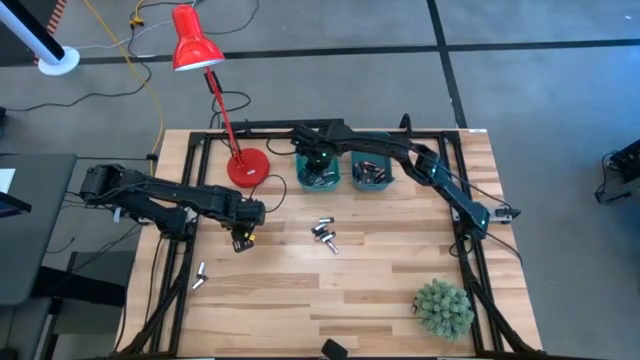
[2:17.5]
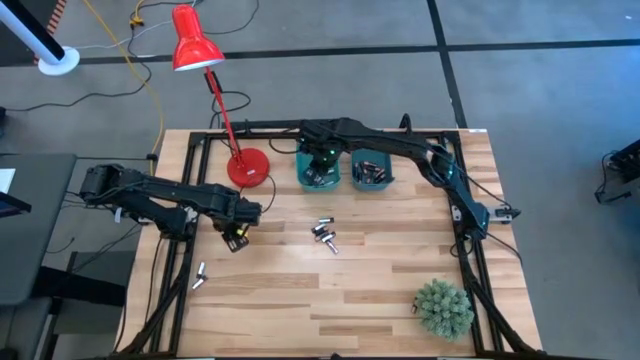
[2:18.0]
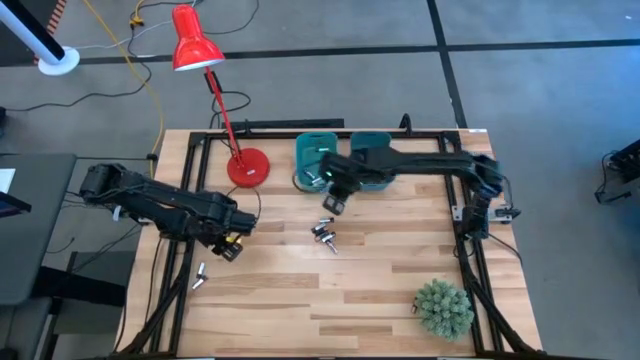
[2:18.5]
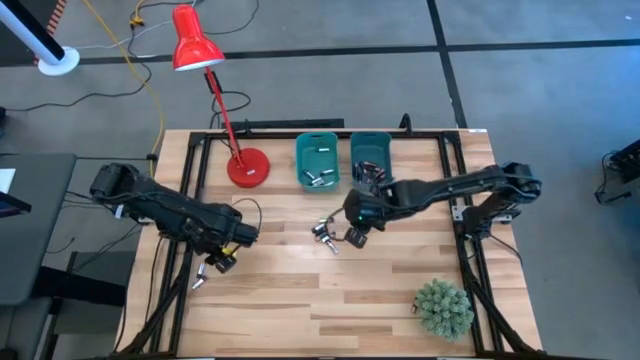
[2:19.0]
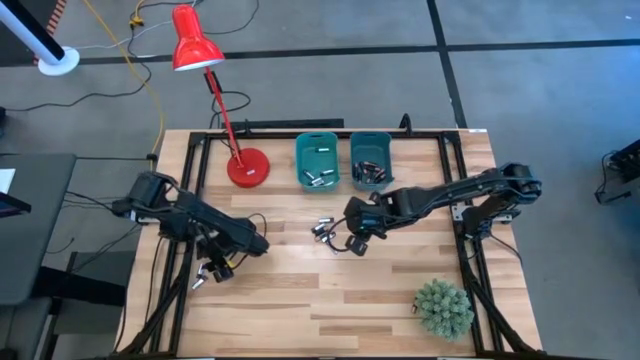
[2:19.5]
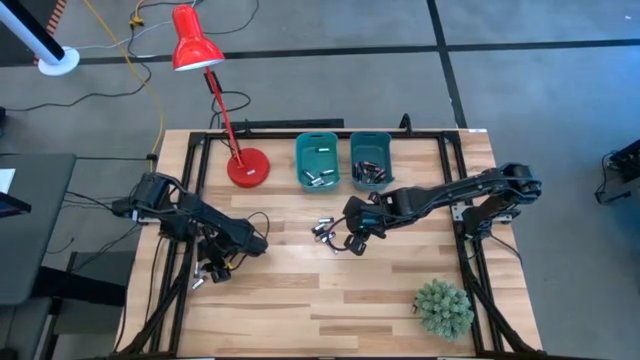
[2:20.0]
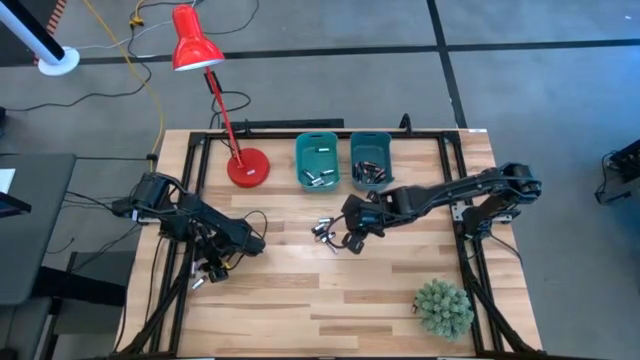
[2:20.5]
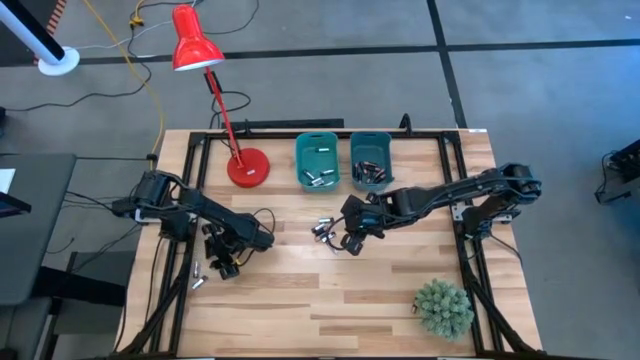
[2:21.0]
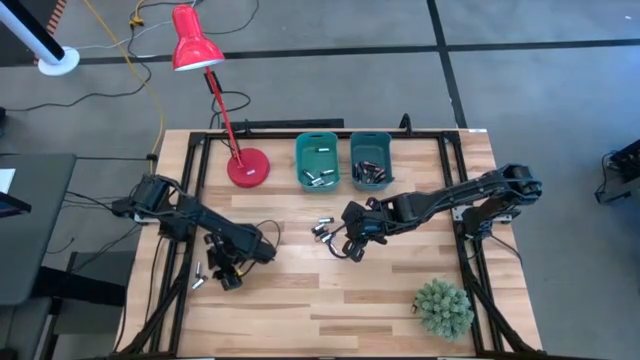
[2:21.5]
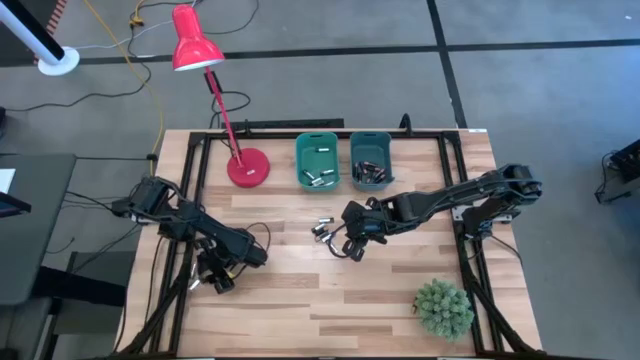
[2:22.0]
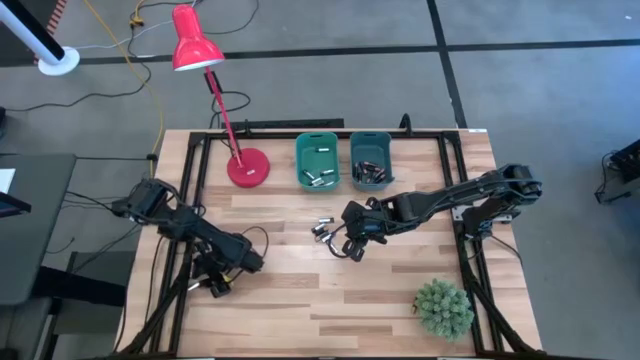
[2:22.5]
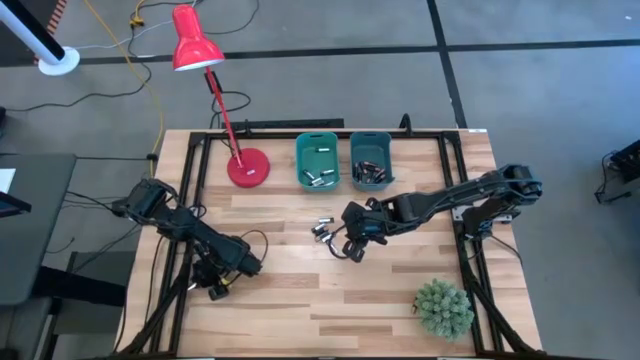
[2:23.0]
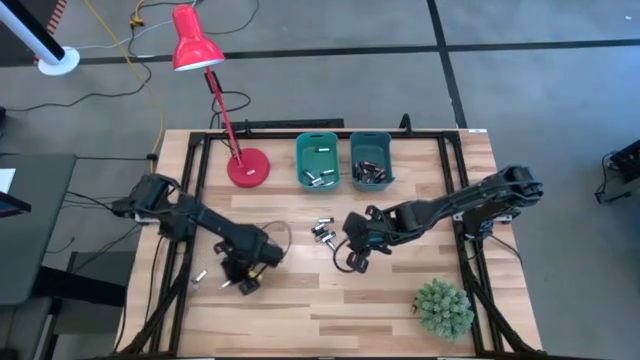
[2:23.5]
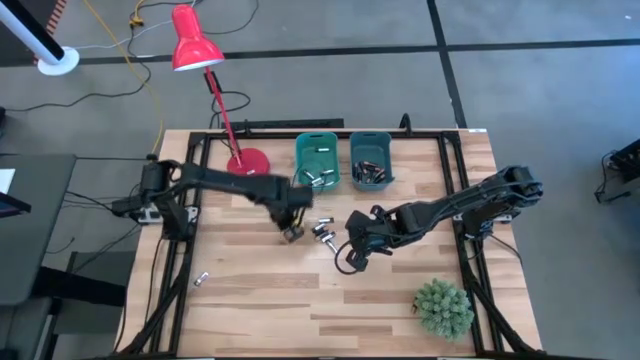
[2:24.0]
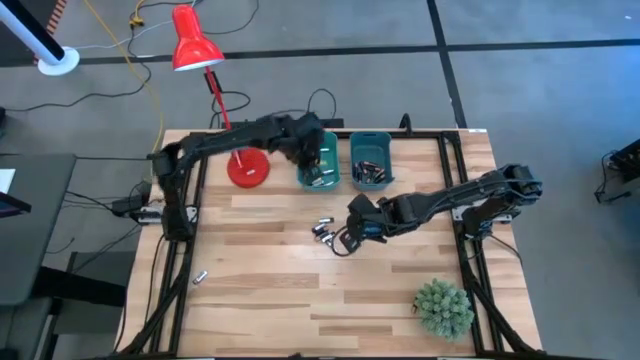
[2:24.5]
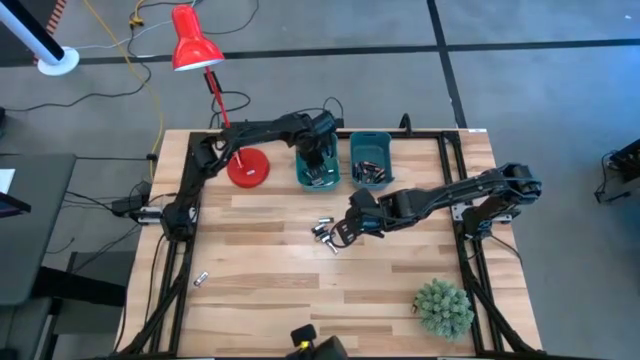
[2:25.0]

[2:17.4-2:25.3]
Task: Sort batteries
Put the silver battery into the green bin

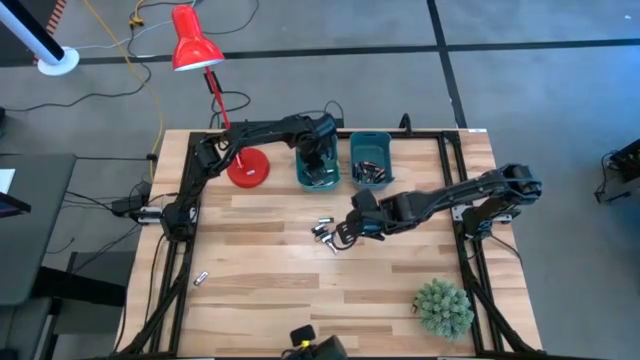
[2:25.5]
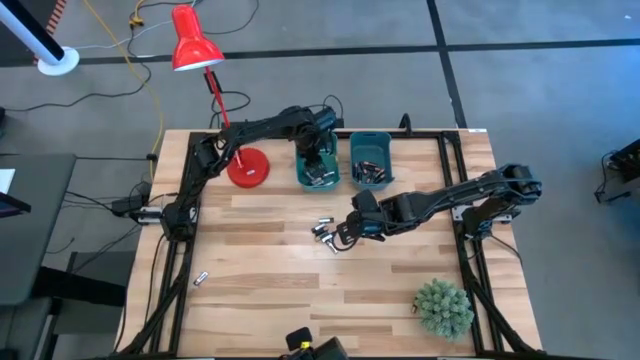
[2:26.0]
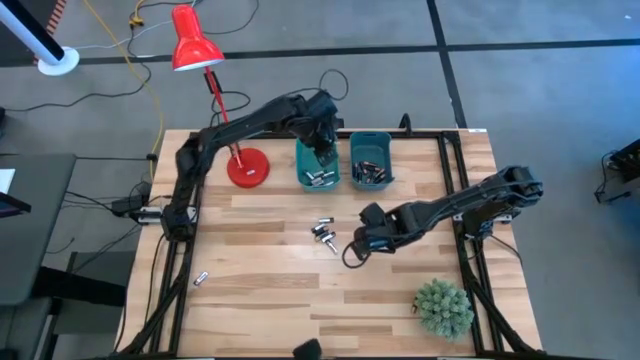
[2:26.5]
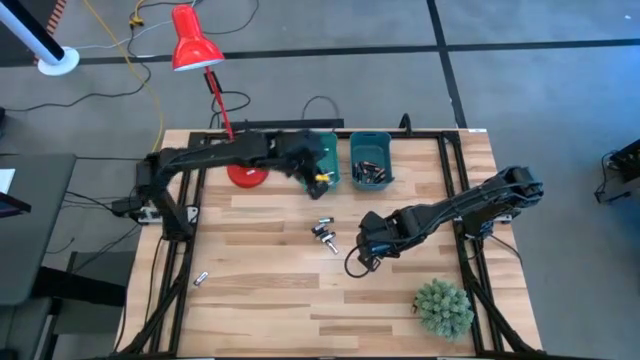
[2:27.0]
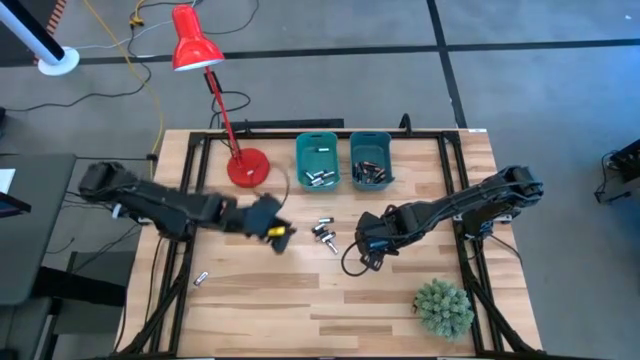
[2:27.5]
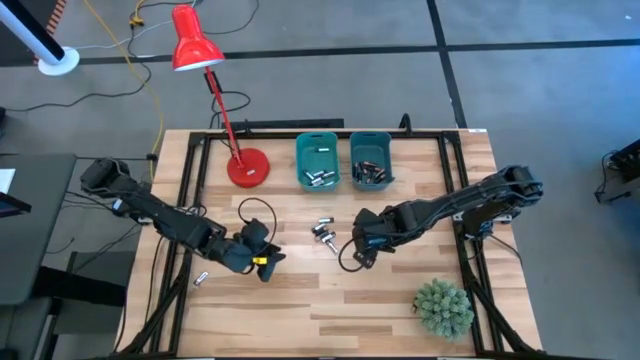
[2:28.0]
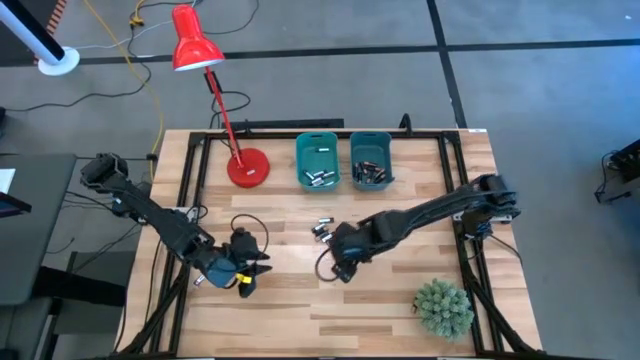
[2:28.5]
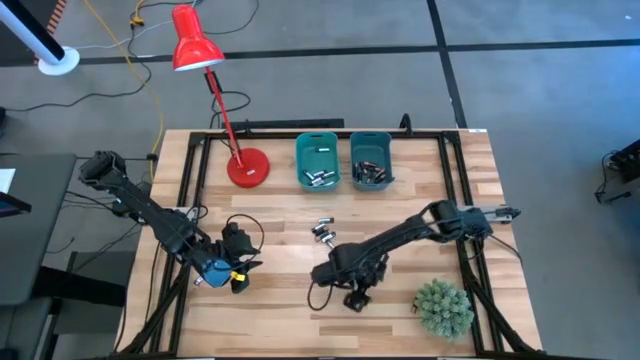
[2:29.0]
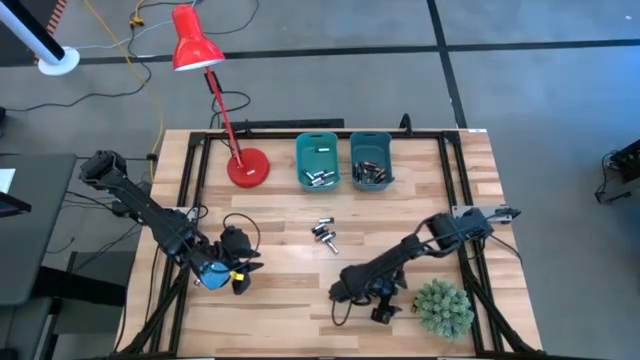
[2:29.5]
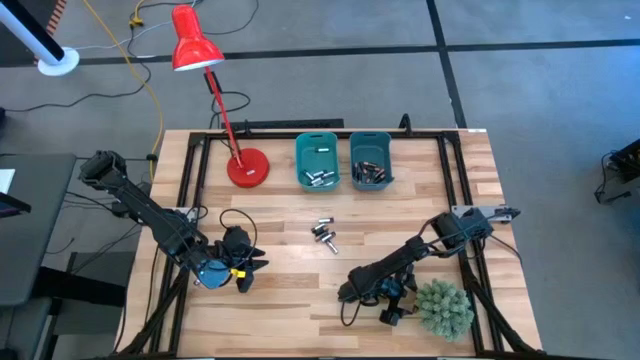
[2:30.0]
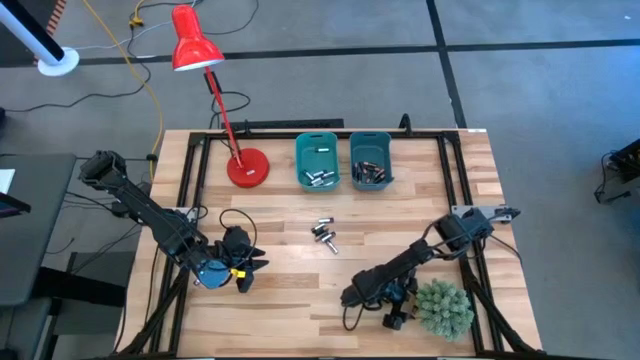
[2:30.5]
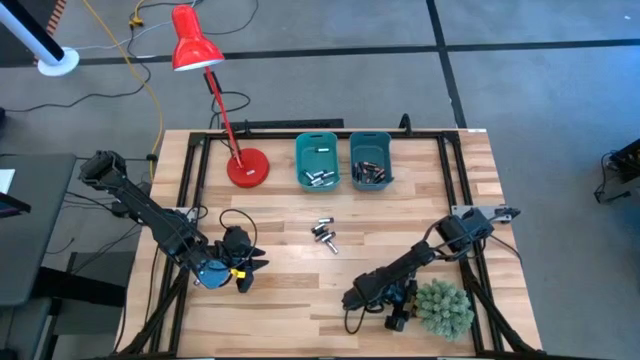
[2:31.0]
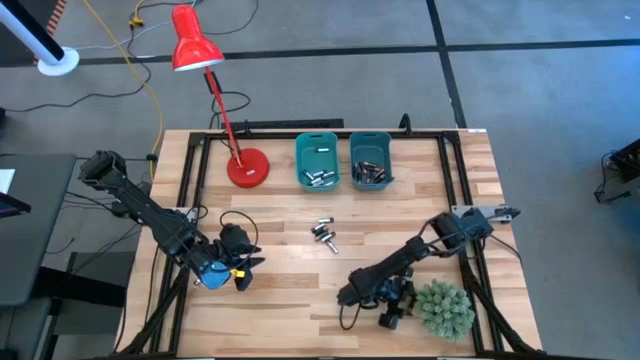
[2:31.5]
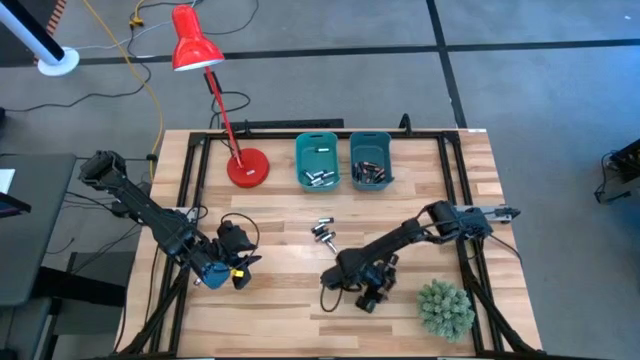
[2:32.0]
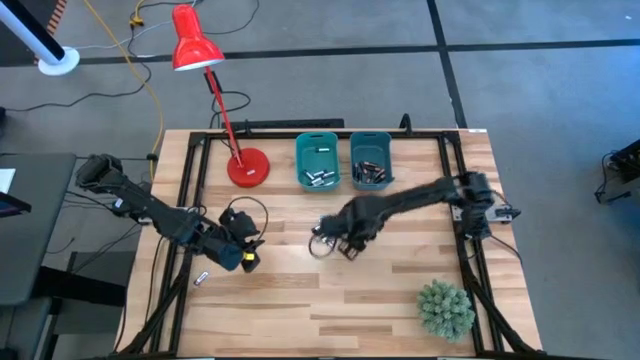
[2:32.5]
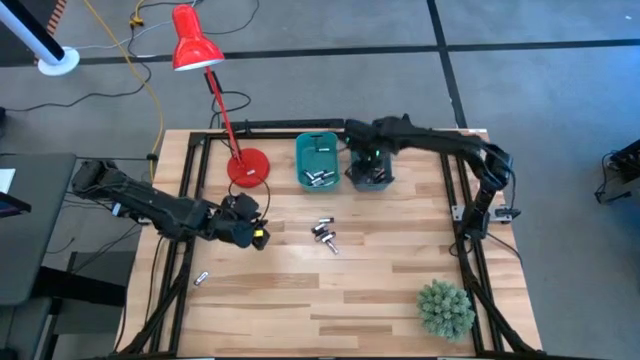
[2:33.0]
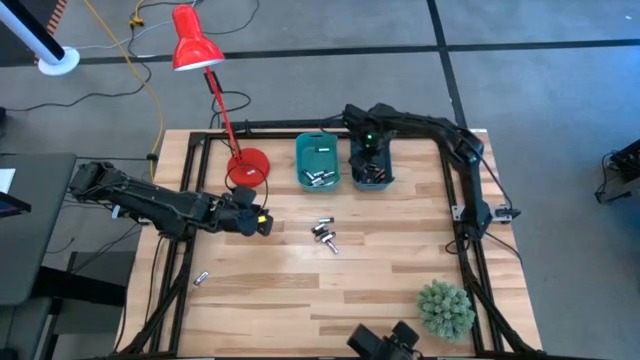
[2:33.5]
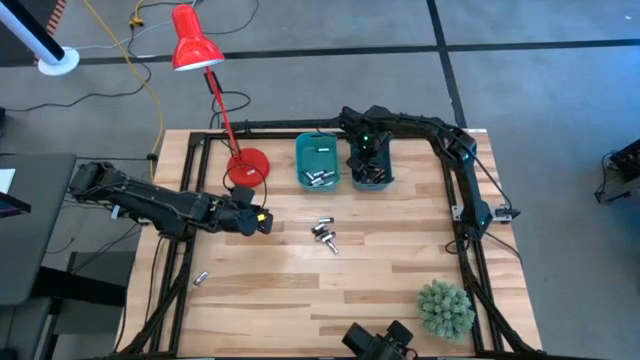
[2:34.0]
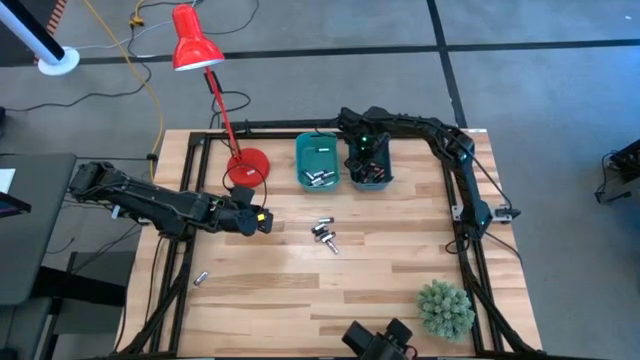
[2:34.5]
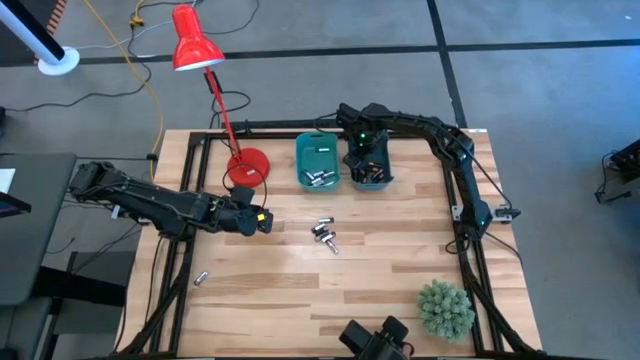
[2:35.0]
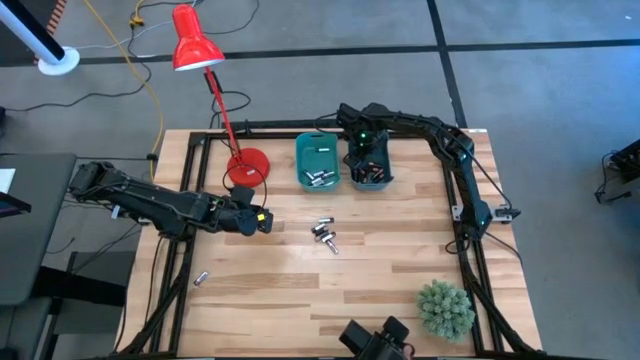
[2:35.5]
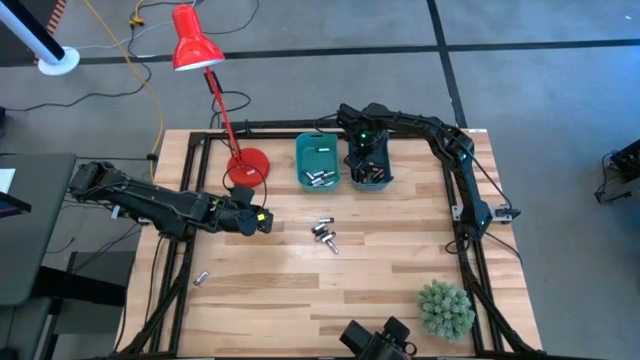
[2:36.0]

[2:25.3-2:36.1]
Put the black battery into the blue bin

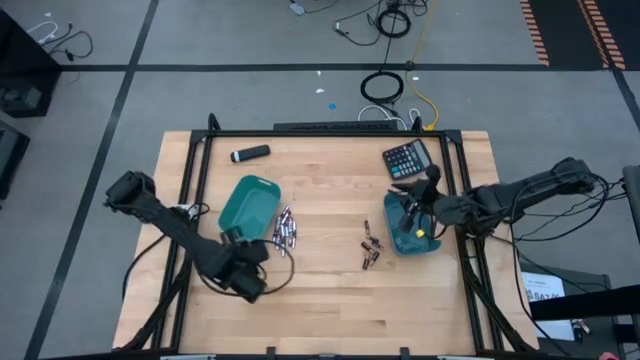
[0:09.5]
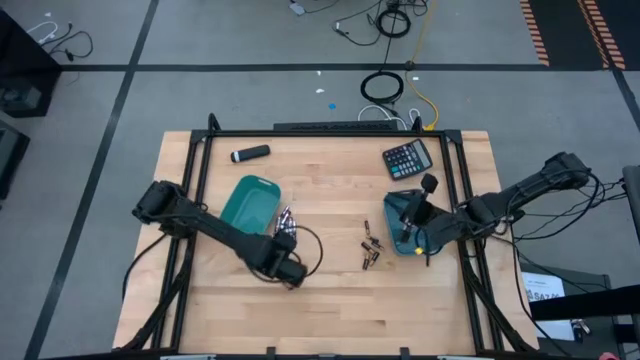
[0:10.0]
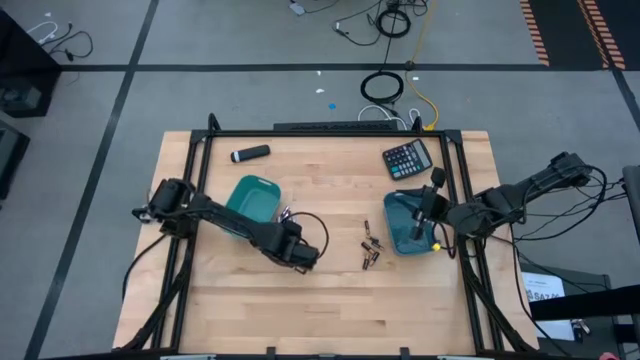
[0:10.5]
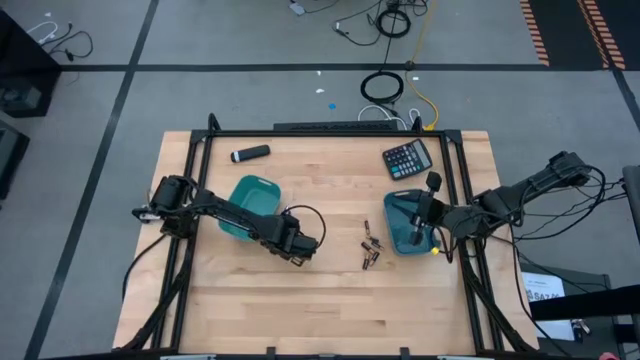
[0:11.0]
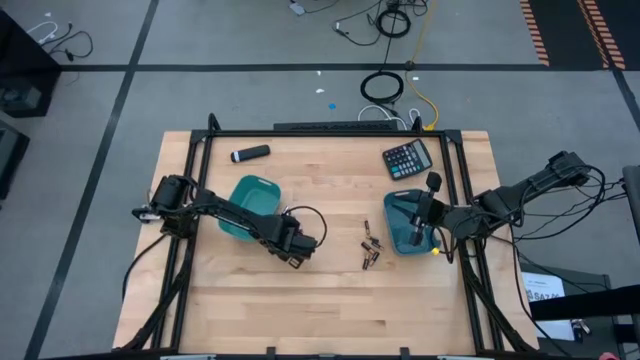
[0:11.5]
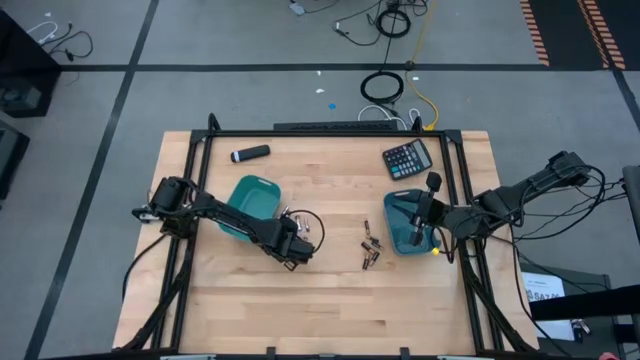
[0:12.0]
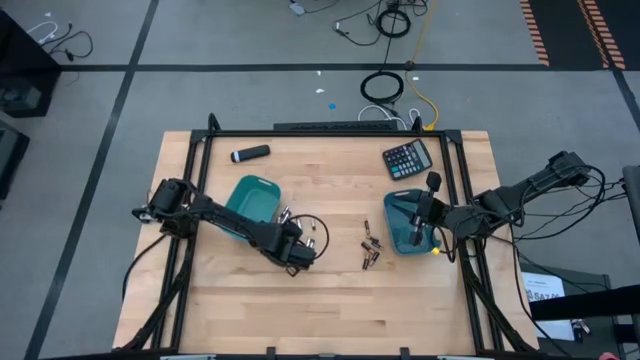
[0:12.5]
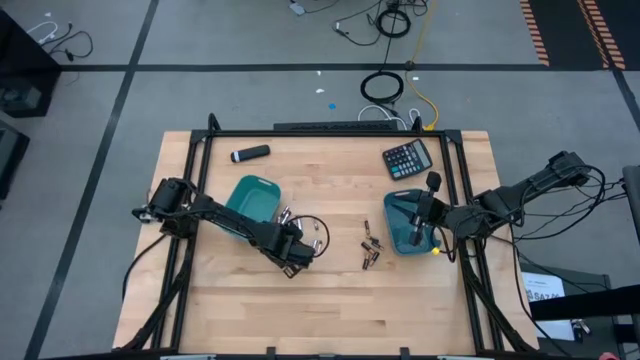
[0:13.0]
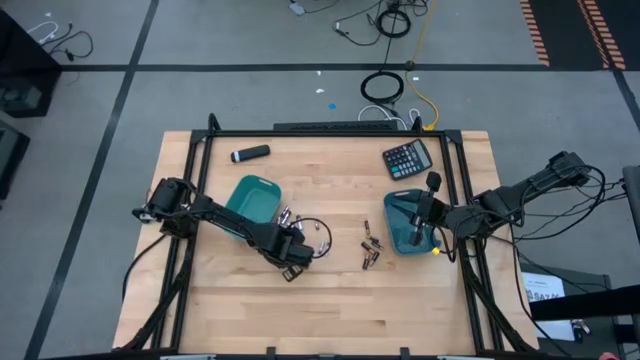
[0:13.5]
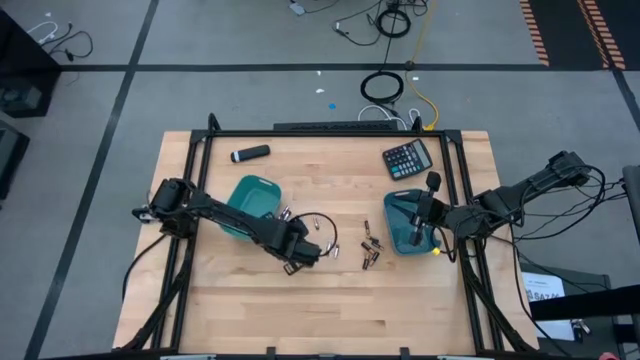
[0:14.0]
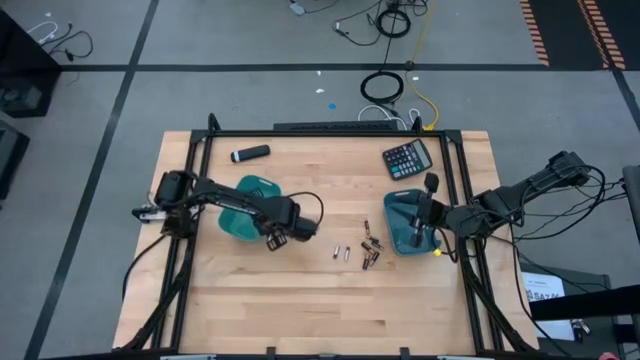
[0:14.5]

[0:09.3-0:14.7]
Task: Sort batteries
Put the silver battery into the green bin
